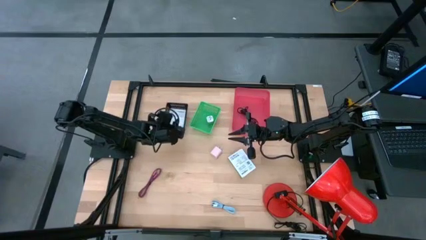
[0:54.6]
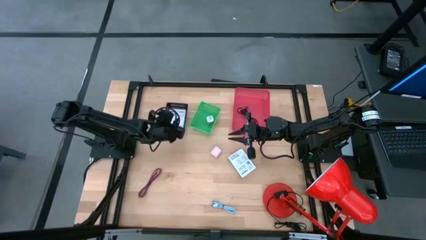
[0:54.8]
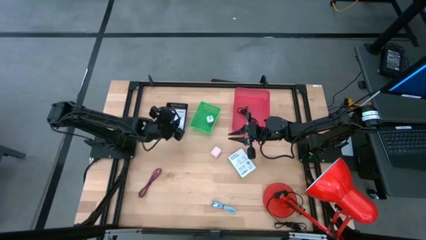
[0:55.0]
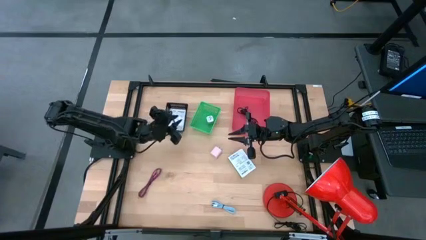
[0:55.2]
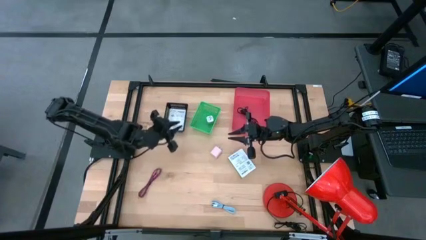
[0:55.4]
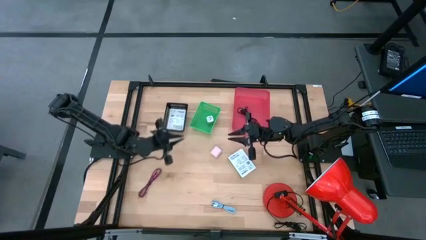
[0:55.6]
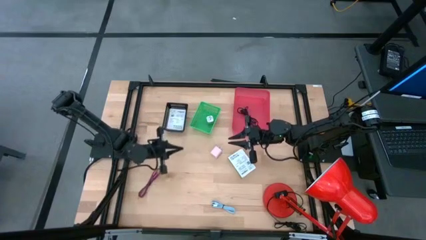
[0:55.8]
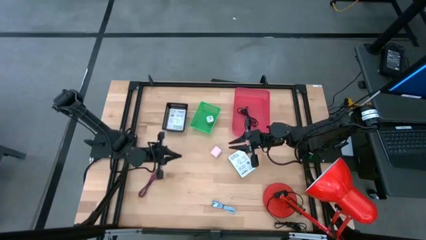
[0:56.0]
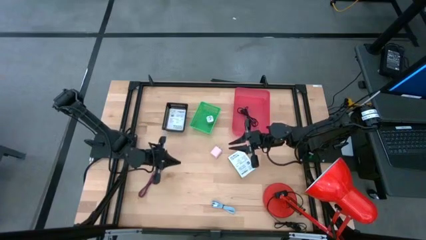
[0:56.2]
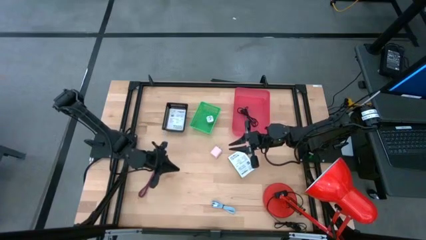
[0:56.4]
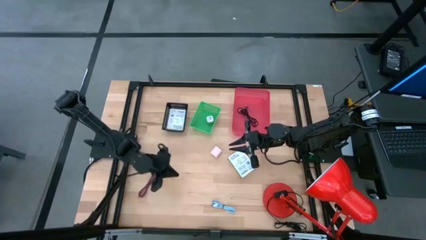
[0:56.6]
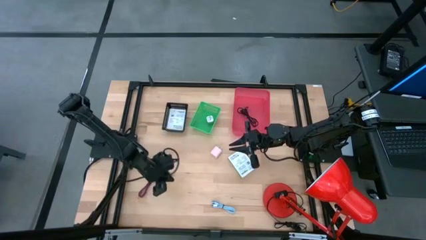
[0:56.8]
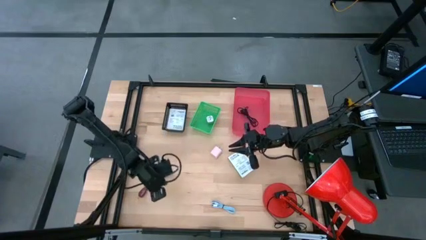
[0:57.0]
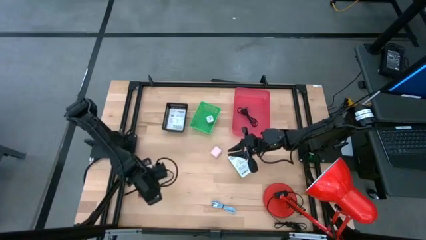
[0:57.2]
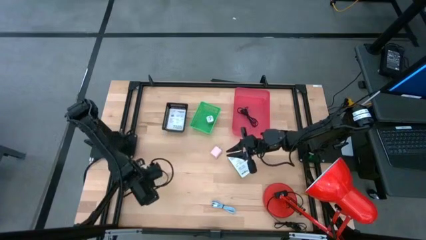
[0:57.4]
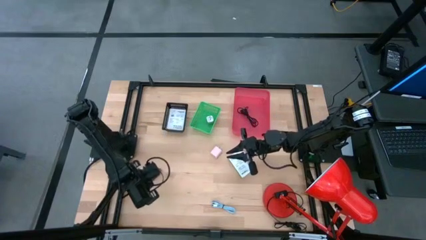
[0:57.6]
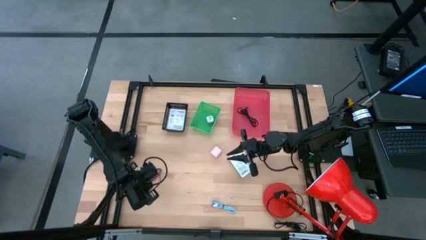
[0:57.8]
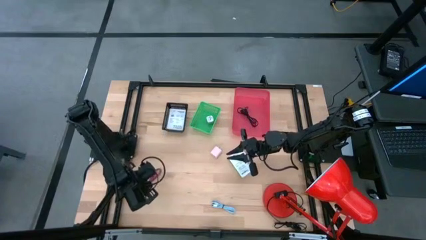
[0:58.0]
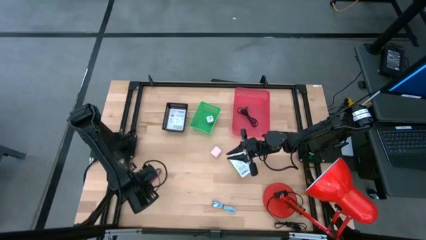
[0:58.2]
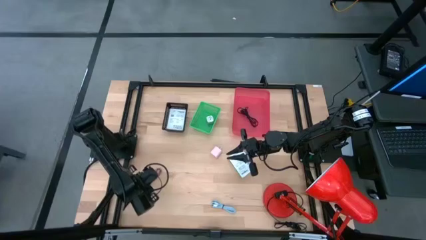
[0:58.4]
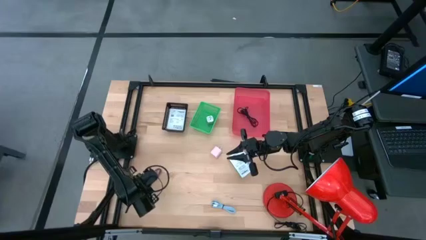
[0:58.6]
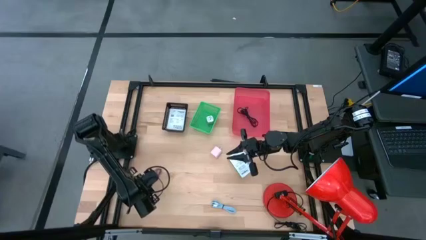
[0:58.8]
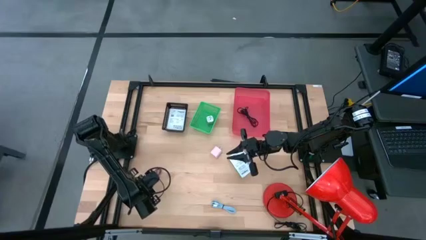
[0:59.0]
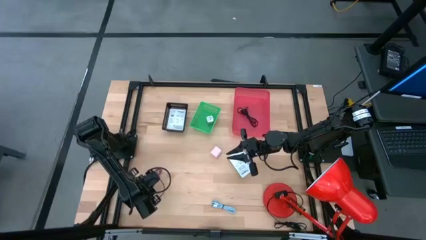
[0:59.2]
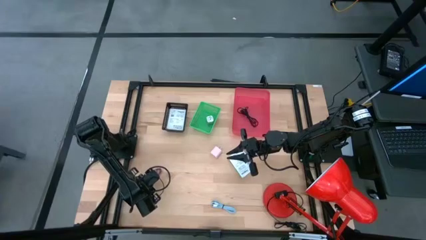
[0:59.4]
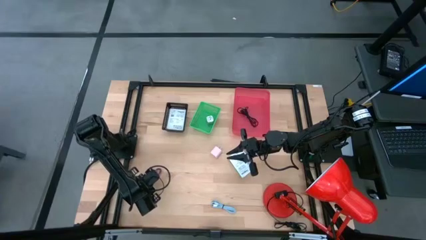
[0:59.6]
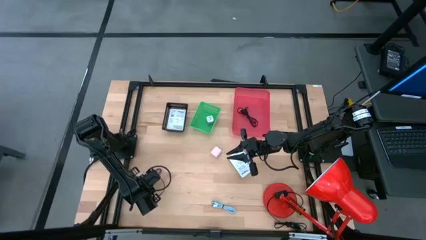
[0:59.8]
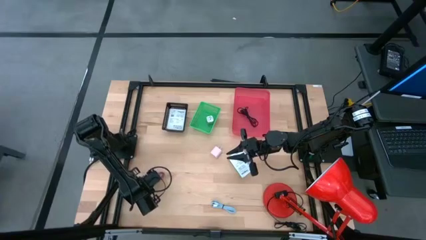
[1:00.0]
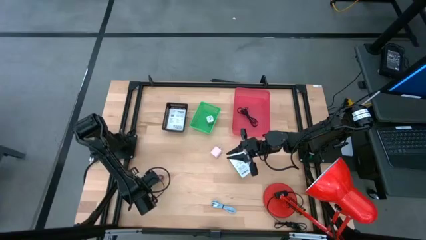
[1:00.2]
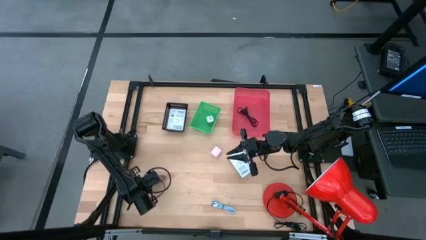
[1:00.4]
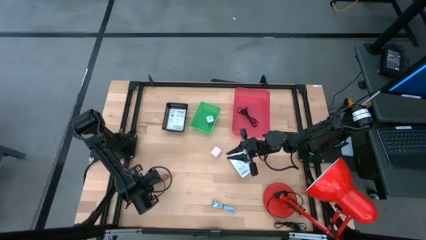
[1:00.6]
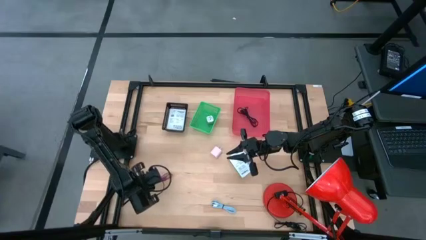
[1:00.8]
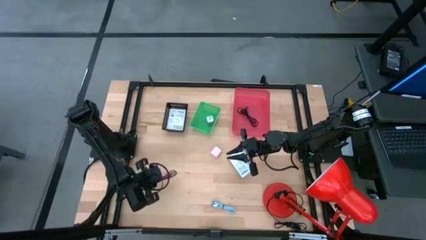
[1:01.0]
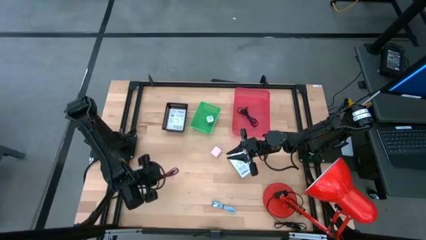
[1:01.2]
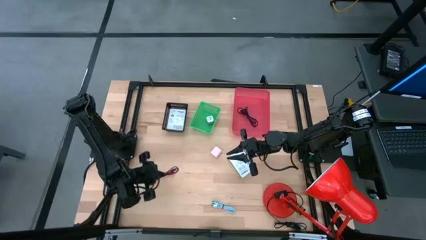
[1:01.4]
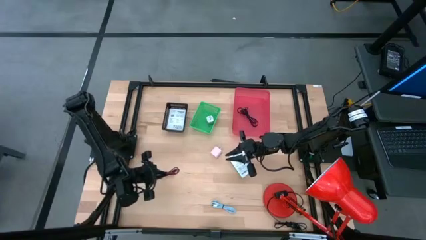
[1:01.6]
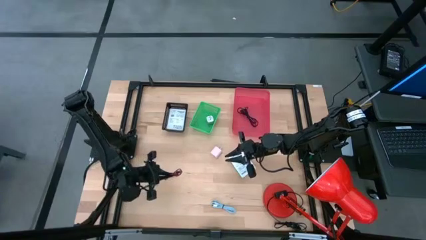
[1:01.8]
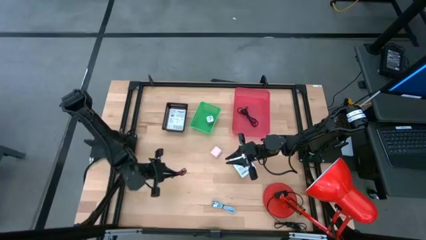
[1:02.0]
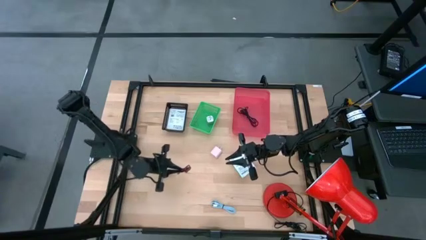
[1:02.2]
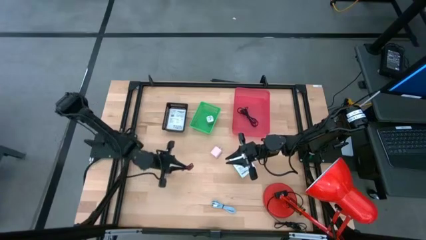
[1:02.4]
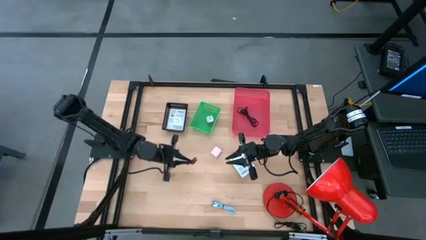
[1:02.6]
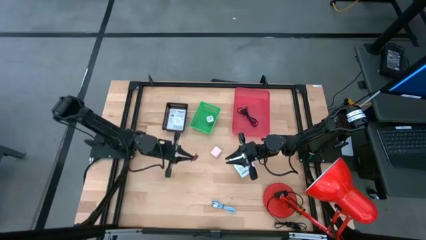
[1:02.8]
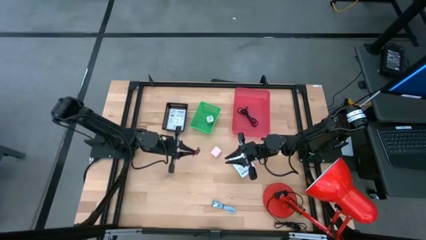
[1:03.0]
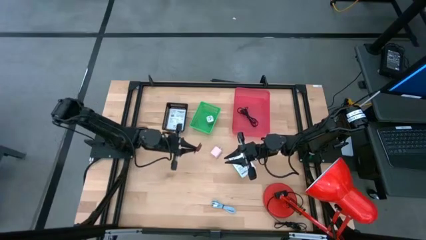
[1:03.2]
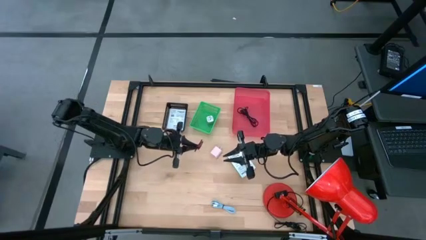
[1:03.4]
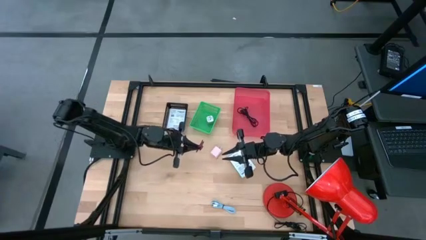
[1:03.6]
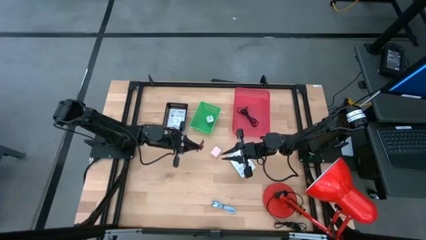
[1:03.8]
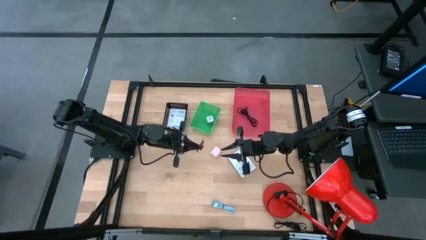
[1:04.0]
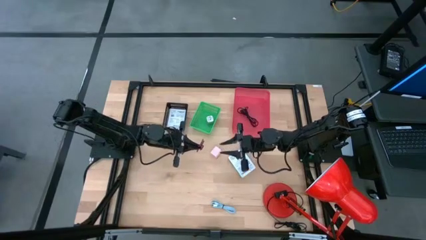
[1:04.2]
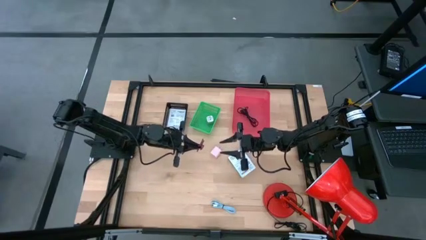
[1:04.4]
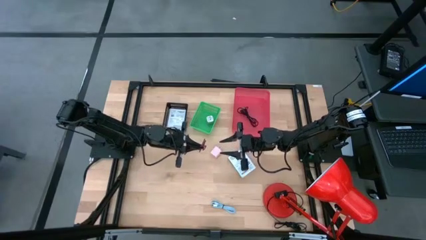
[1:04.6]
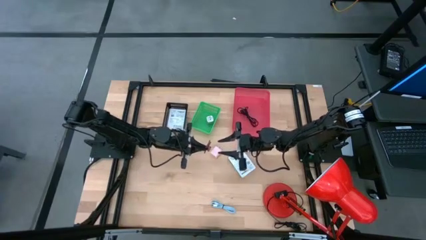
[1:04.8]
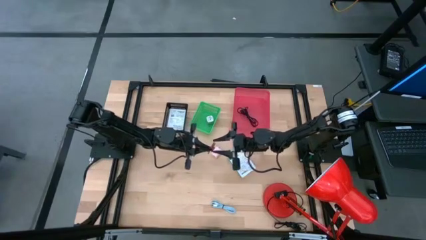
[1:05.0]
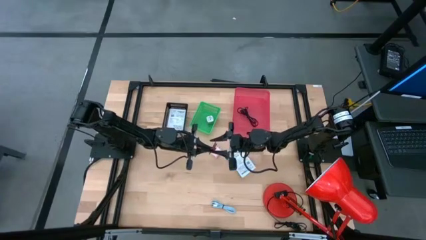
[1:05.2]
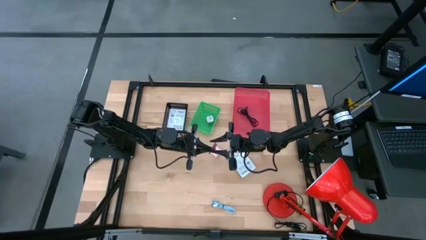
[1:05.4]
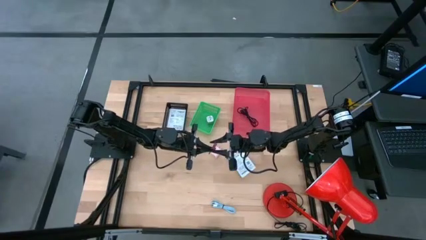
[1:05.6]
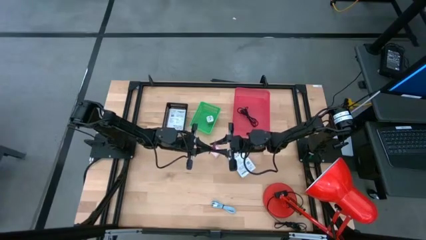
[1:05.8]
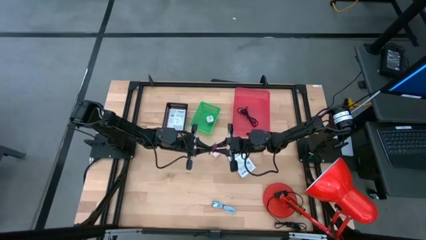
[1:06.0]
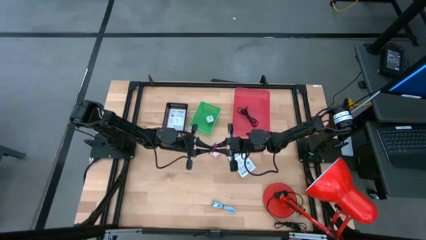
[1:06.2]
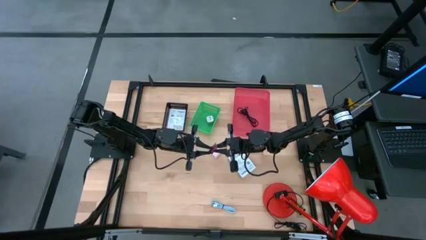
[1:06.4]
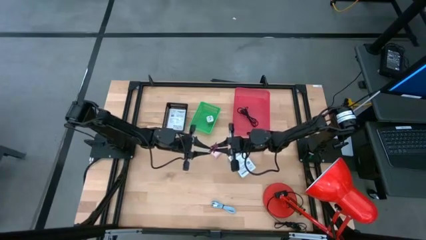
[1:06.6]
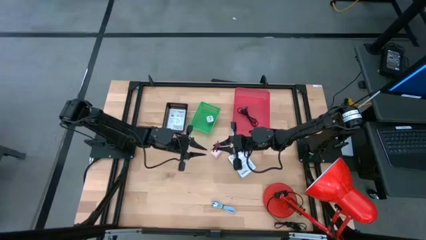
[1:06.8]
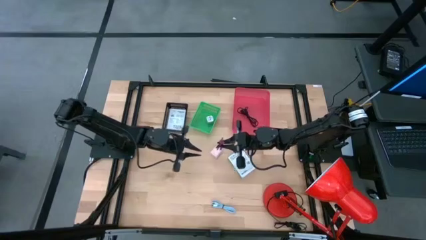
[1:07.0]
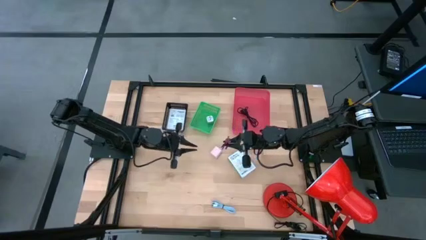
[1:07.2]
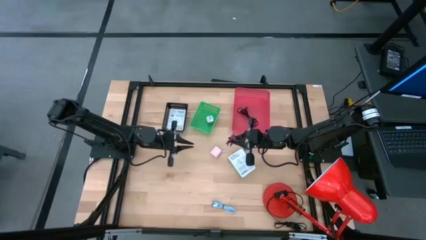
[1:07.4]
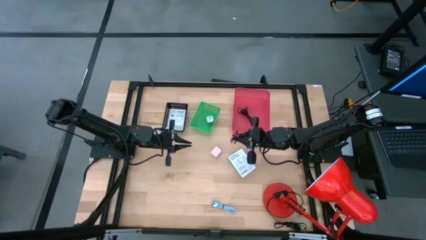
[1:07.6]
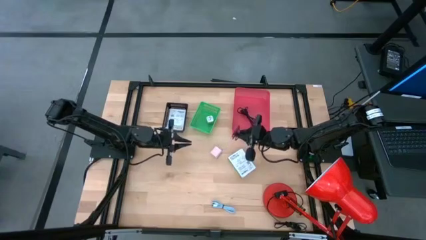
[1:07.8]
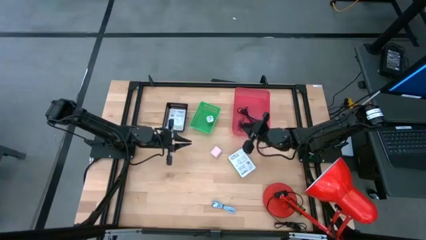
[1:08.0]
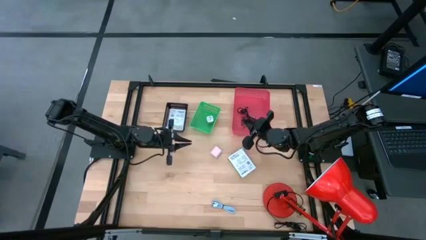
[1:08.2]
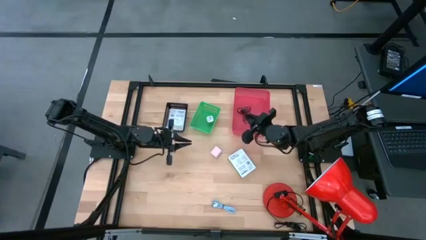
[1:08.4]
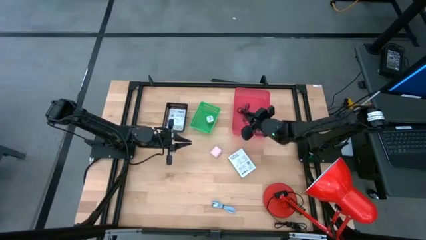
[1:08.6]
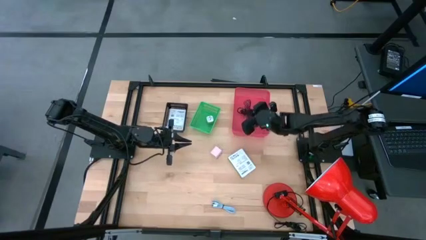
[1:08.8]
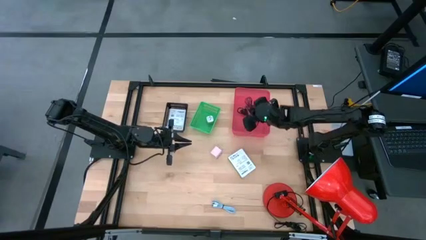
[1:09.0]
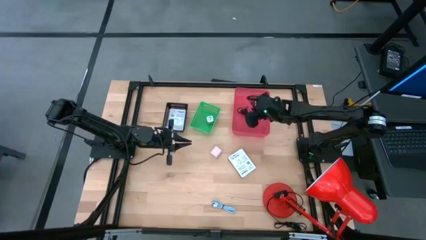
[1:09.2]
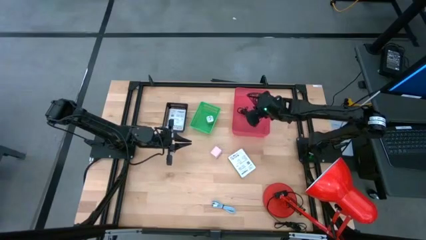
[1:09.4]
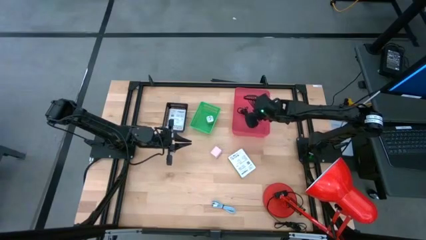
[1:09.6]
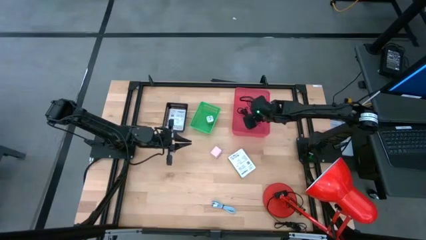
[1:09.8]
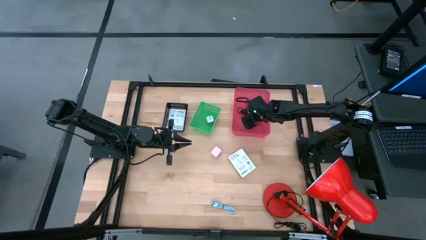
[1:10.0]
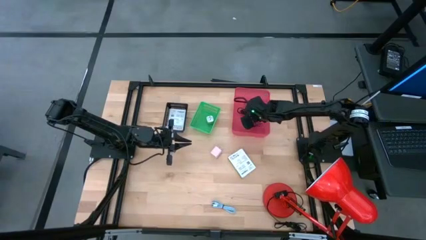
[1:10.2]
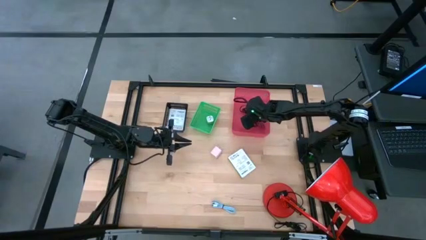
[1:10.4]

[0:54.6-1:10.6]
Task: Pick and place items into bin
Put the red charger cable into the red bin
